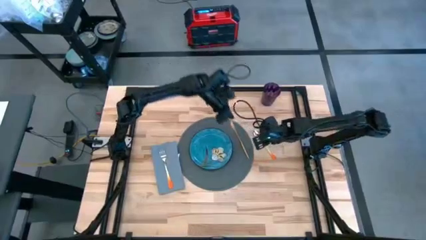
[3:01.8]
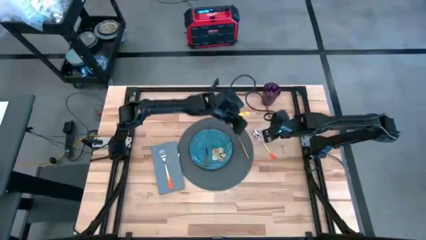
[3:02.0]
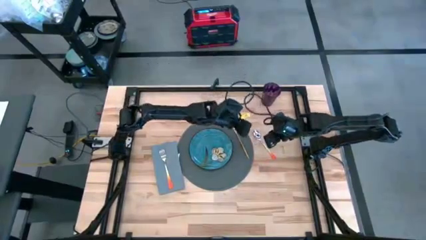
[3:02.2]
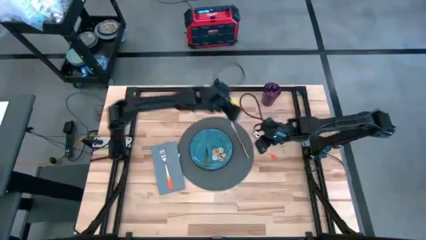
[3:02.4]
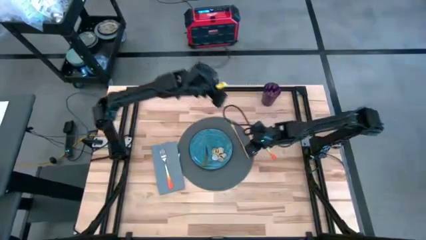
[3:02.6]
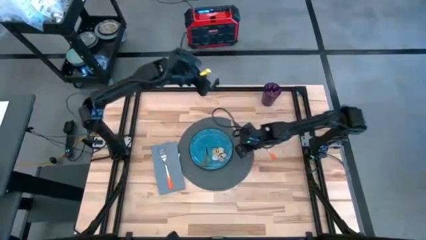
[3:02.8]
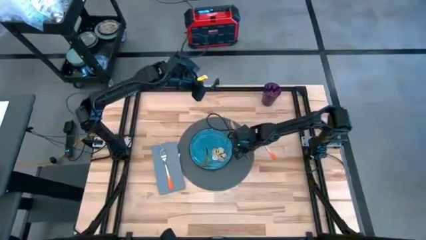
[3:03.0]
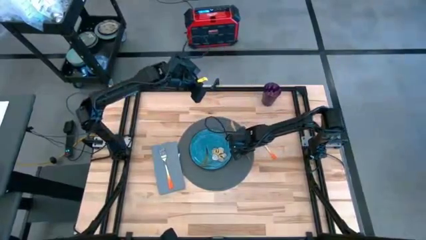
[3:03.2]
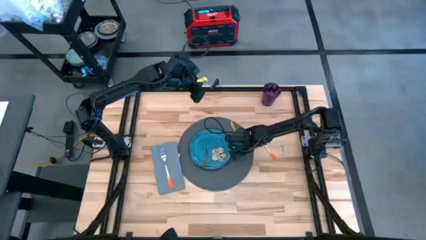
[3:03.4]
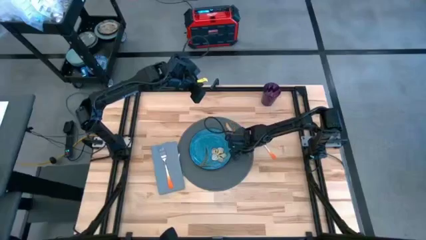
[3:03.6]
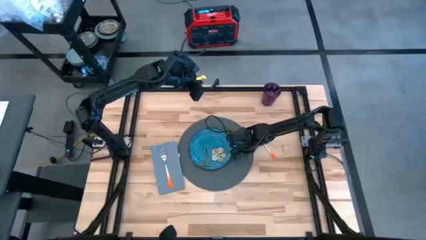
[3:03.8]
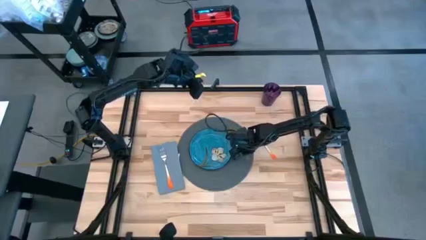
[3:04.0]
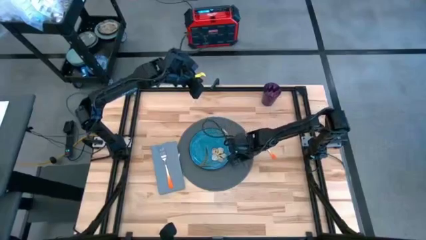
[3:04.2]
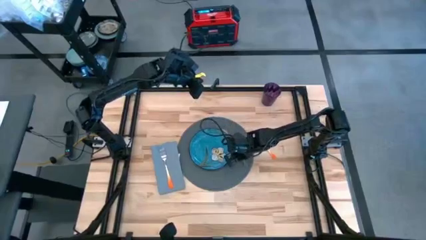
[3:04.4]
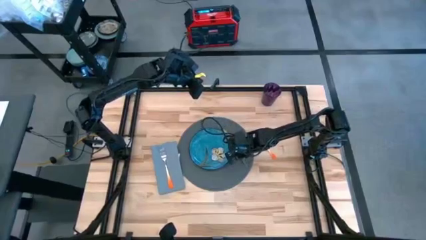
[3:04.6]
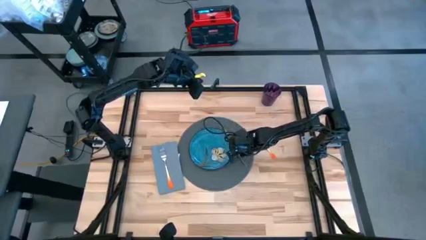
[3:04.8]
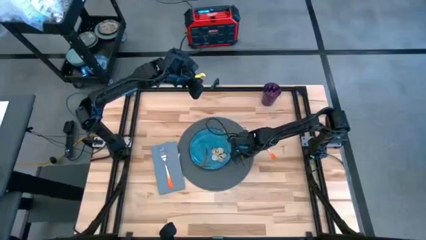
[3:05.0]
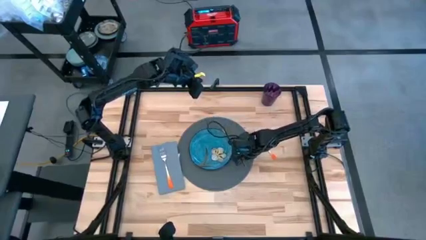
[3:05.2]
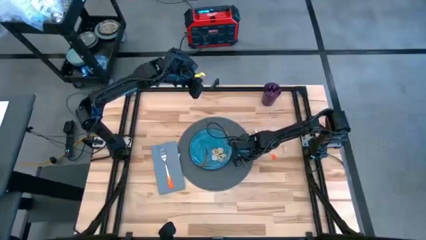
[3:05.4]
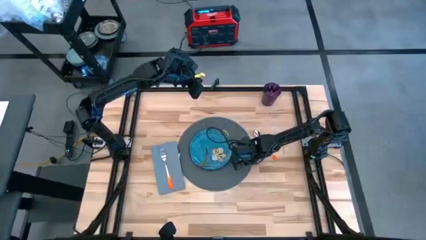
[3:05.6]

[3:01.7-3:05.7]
Task: Set table place
Adjust the gold knife on the gray placemat

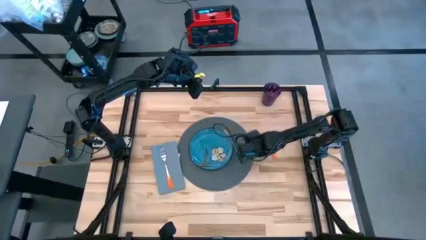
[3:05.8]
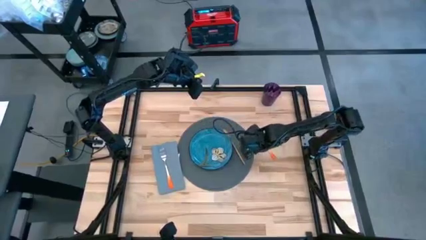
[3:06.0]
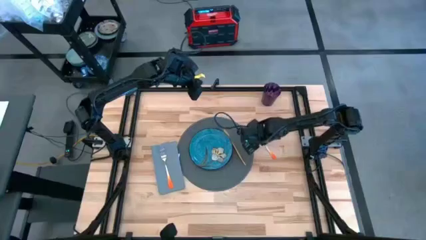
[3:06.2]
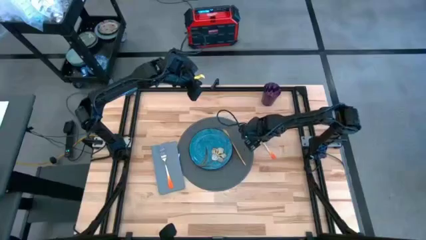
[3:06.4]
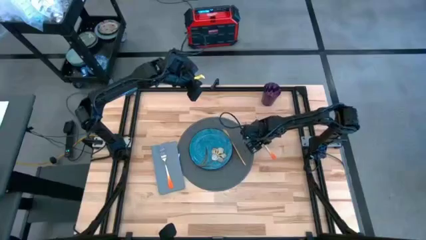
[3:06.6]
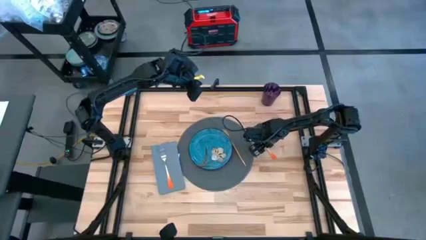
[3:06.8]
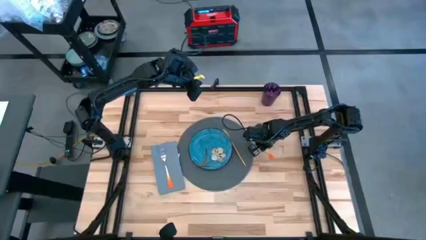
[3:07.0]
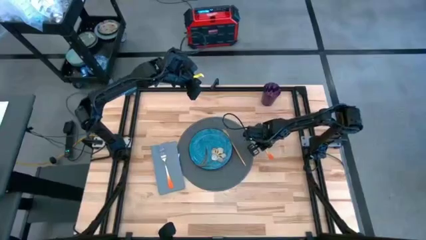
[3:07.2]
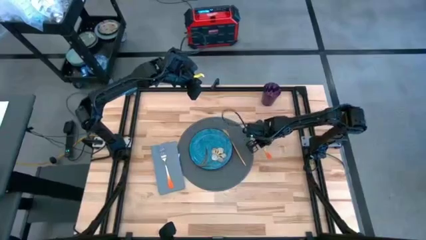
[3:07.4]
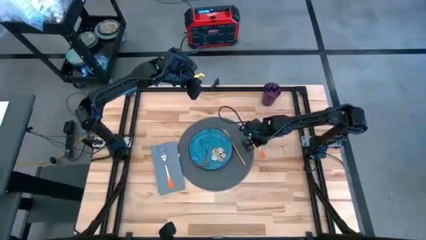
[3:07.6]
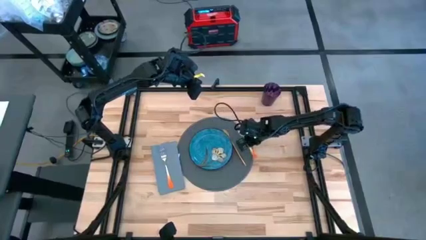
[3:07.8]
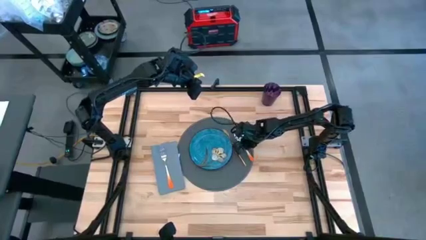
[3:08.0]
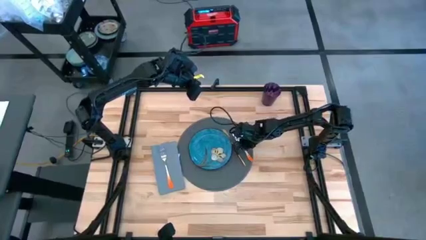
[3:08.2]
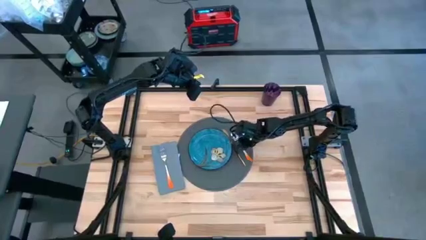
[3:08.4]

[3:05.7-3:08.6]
Put the orange spoon on the gray placemat

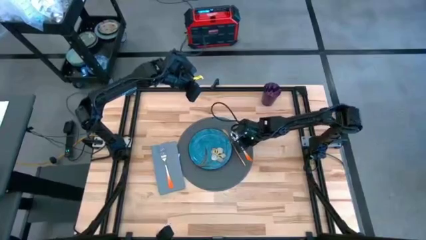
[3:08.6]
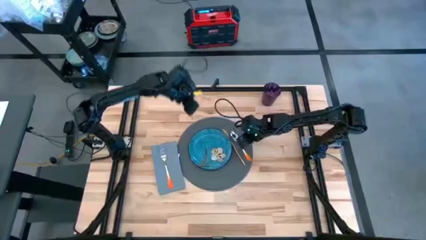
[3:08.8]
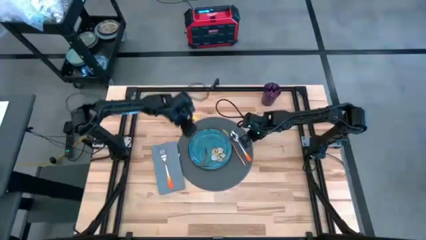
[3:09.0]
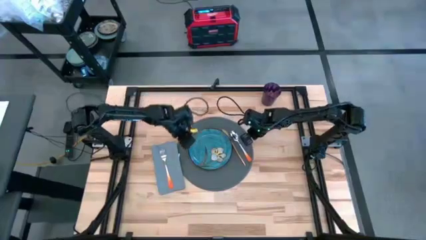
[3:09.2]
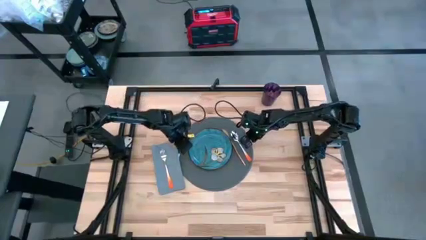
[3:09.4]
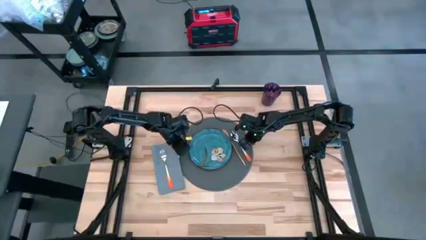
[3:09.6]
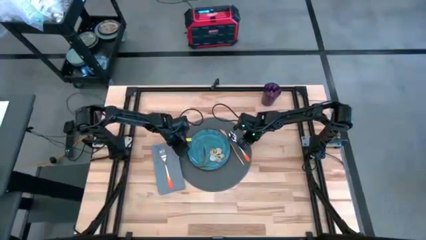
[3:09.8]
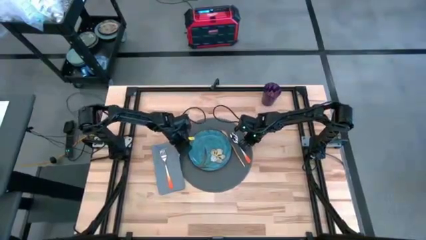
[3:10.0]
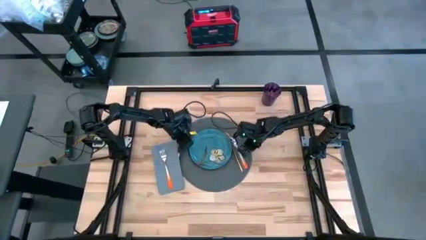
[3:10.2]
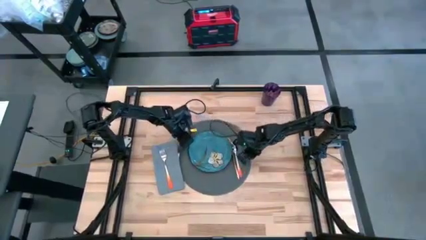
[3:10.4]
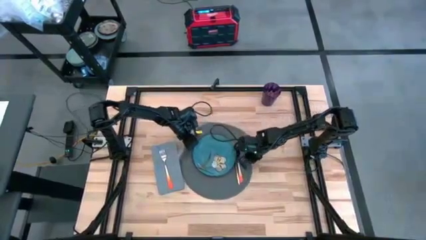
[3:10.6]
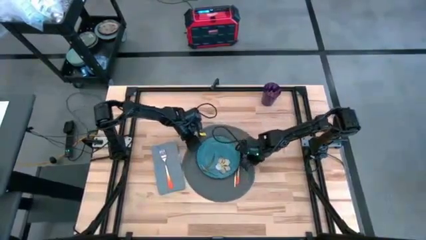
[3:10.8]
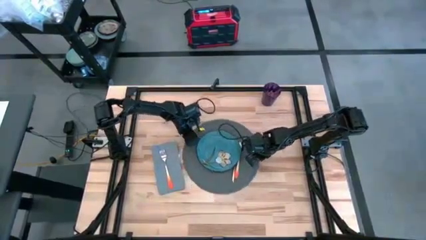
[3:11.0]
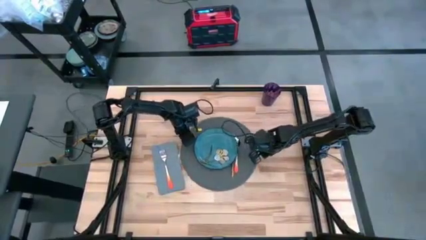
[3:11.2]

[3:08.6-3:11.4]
Adjust the gray placemat on the table

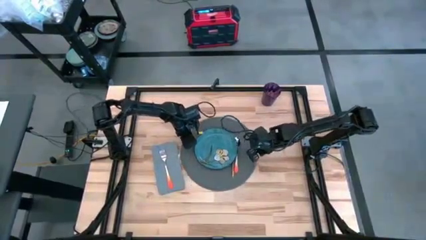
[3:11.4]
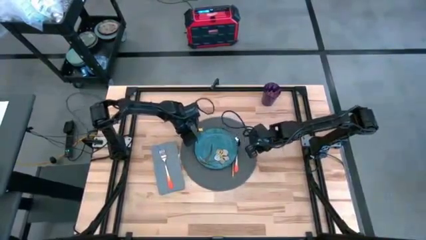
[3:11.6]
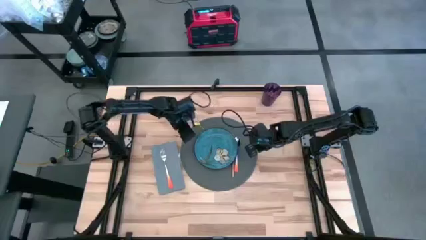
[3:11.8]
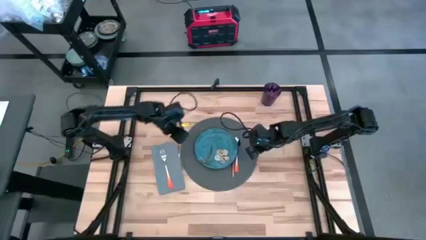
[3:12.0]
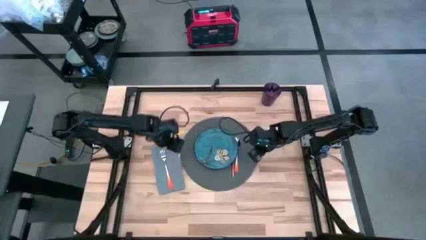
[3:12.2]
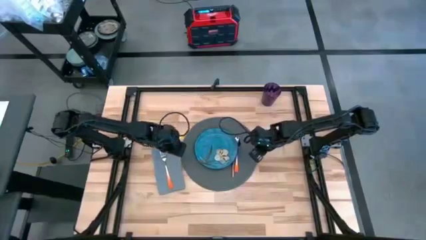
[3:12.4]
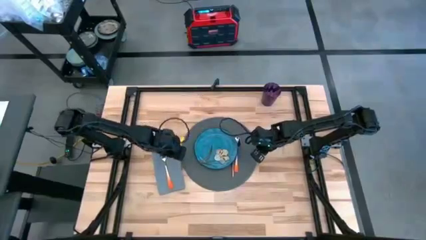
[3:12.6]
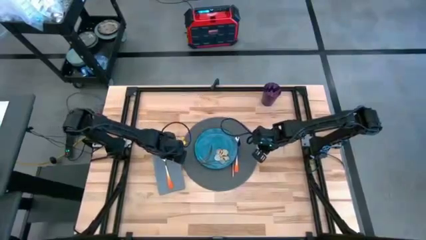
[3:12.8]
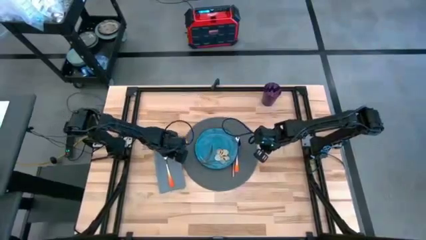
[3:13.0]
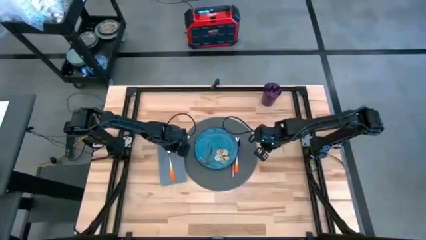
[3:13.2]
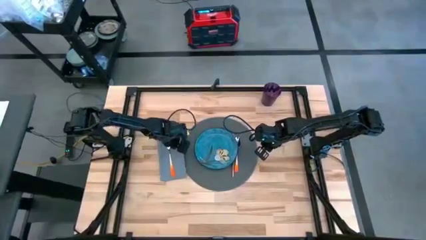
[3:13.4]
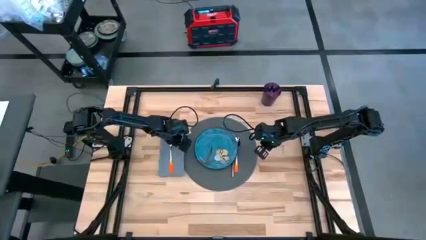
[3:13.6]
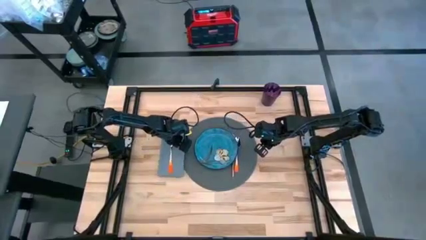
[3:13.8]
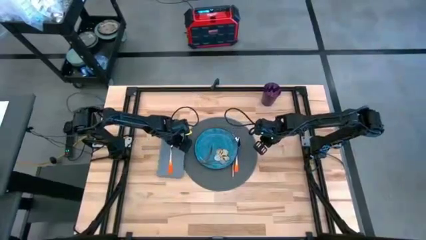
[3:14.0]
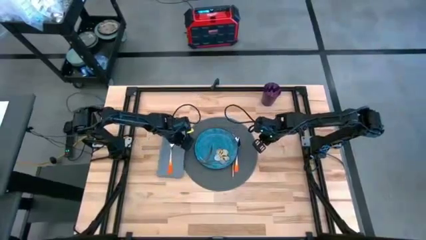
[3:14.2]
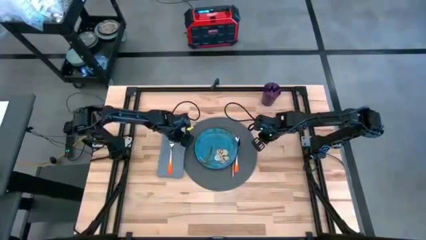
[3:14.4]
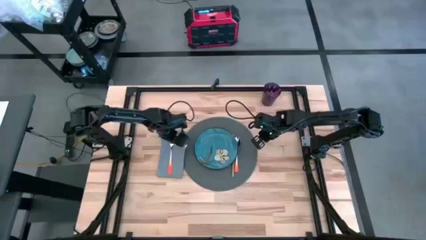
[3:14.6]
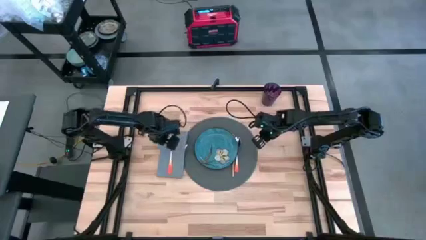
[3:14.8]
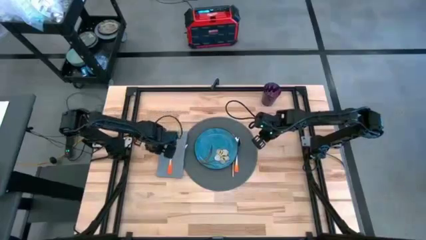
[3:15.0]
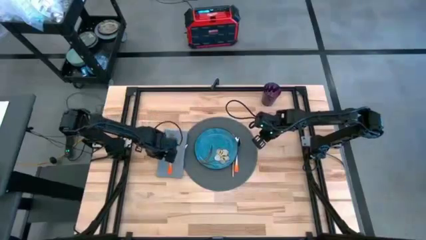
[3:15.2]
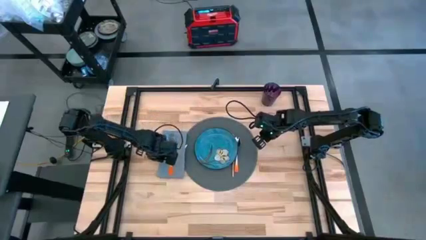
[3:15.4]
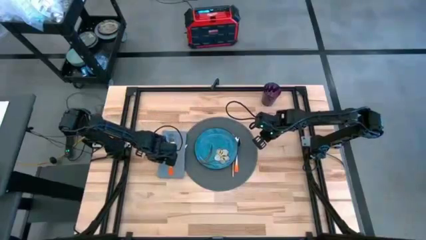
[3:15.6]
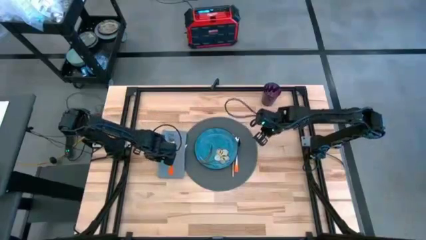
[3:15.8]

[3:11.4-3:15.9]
Adjust the light gray table napkin on the table

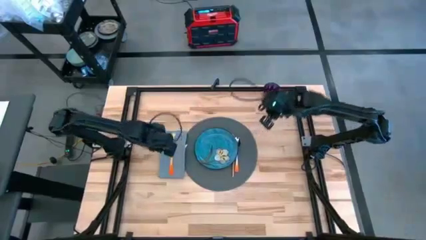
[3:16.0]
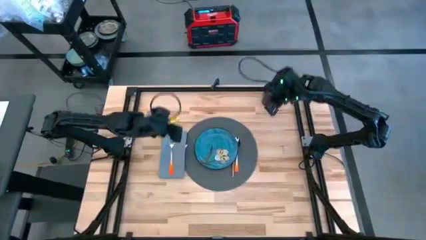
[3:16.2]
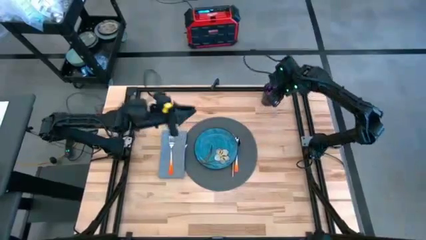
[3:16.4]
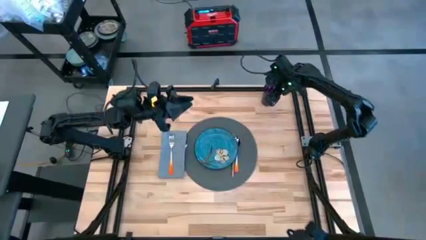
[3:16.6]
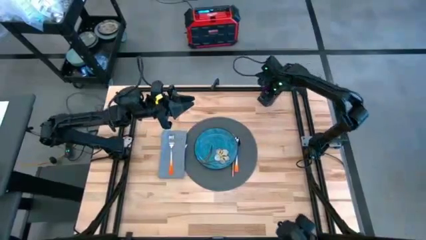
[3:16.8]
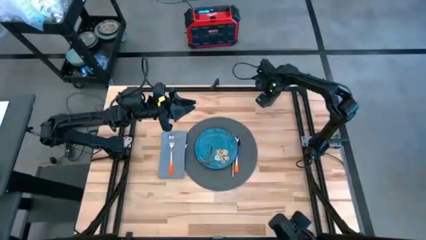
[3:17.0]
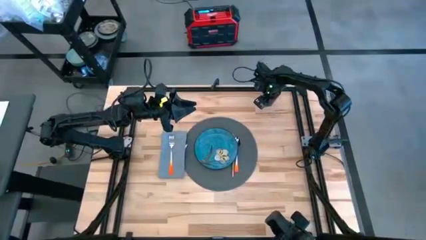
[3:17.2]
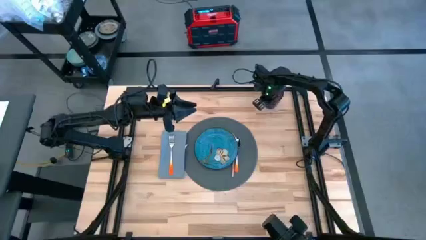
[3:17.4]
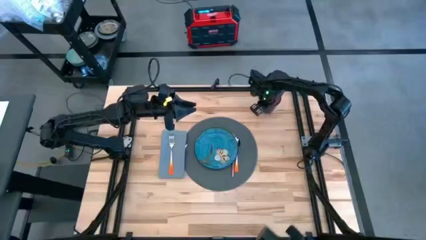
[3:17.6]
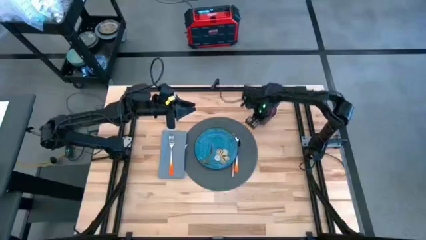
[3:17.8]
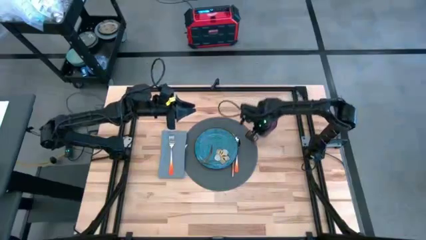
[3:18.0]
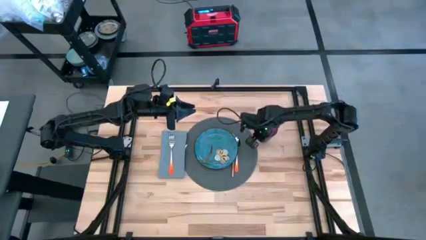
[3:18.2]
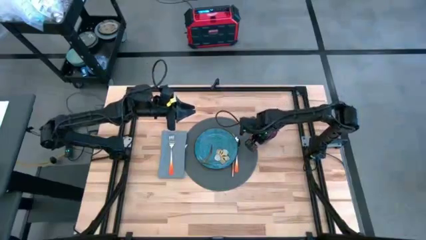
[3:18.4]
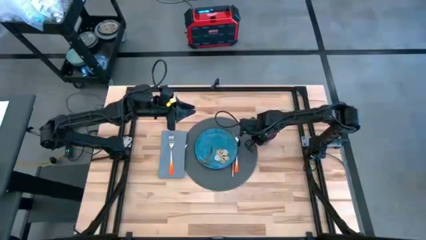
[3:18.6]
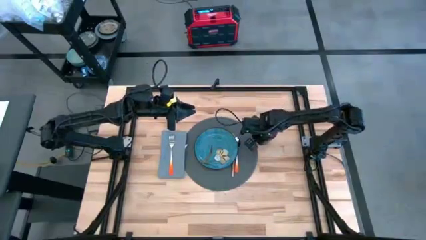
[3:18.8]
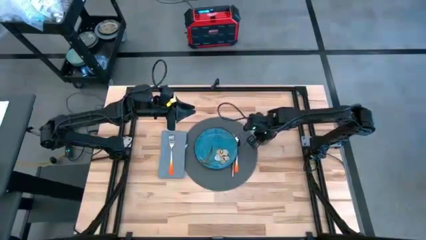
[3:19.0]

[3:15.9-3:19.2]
Move the violet cup to the top right of the gray placemat
